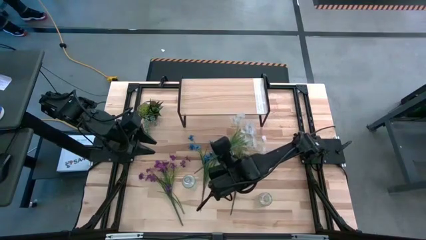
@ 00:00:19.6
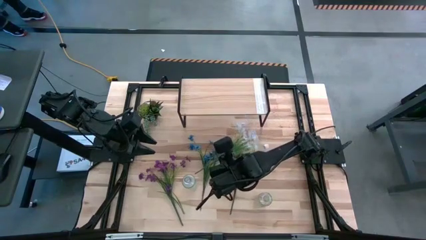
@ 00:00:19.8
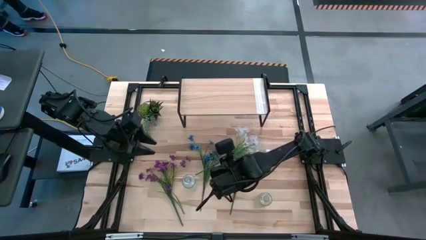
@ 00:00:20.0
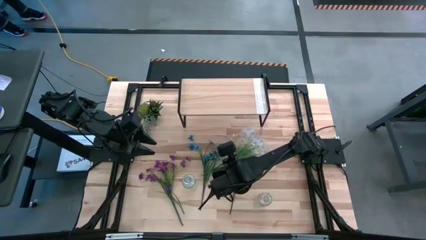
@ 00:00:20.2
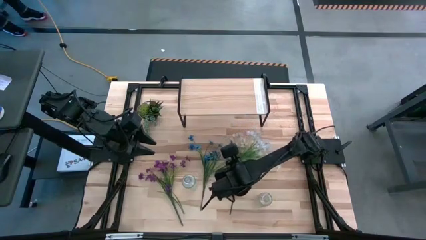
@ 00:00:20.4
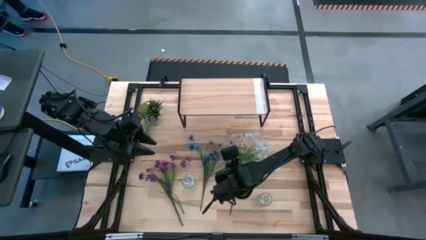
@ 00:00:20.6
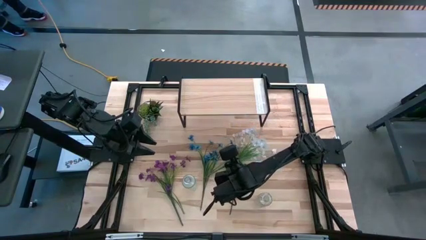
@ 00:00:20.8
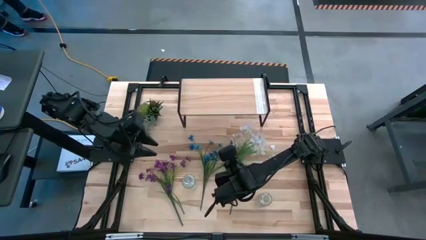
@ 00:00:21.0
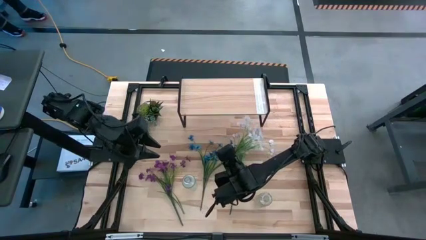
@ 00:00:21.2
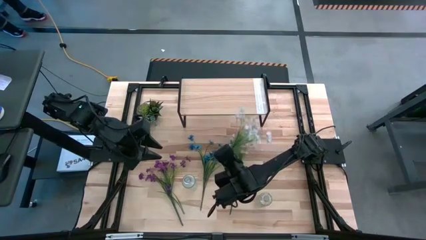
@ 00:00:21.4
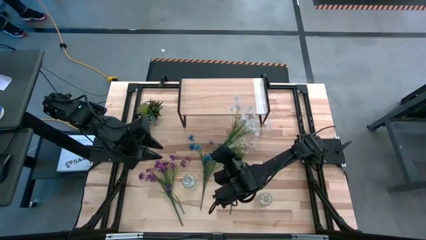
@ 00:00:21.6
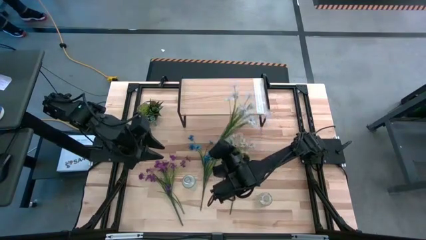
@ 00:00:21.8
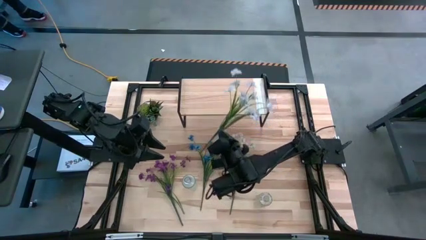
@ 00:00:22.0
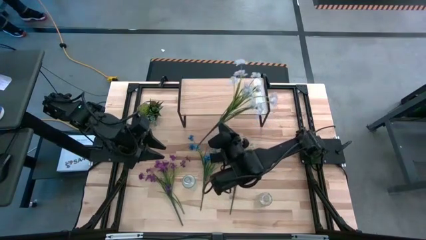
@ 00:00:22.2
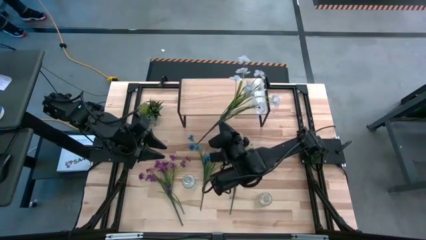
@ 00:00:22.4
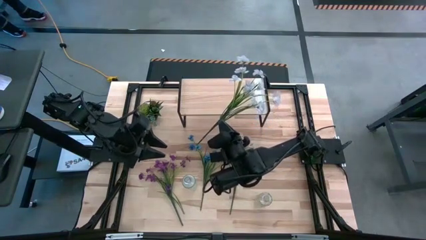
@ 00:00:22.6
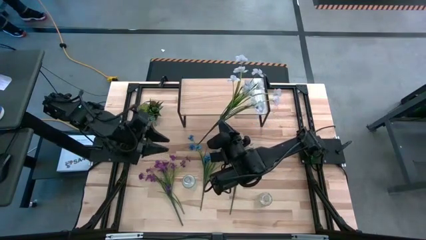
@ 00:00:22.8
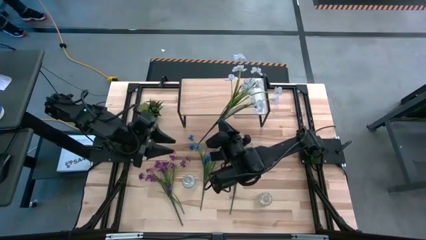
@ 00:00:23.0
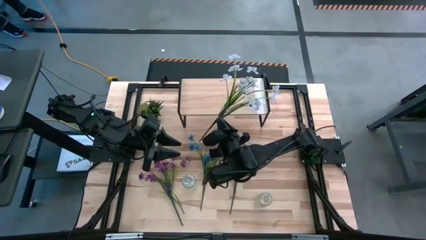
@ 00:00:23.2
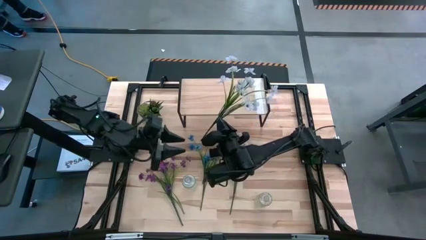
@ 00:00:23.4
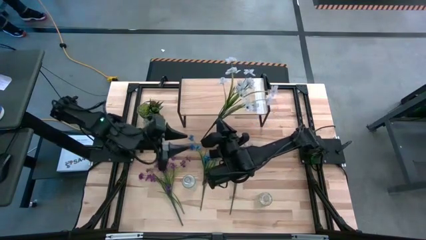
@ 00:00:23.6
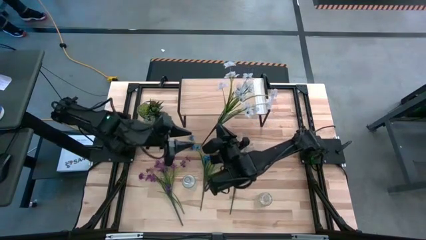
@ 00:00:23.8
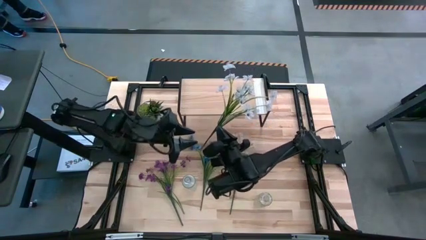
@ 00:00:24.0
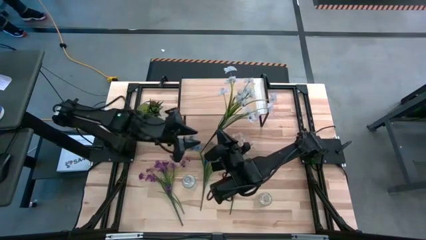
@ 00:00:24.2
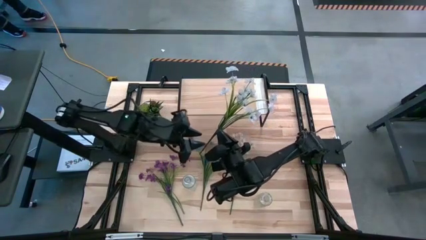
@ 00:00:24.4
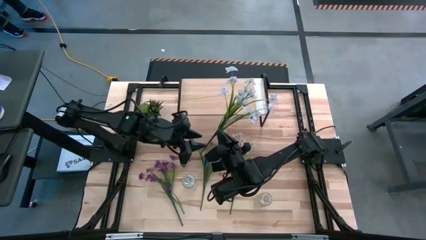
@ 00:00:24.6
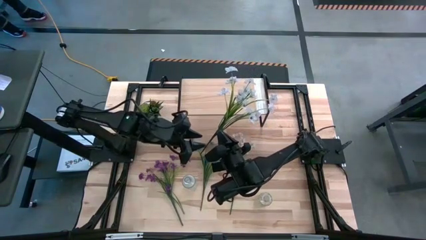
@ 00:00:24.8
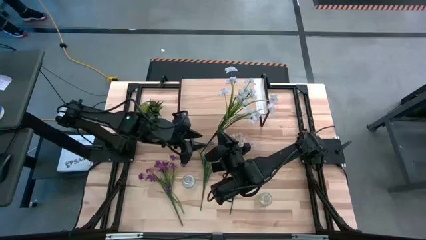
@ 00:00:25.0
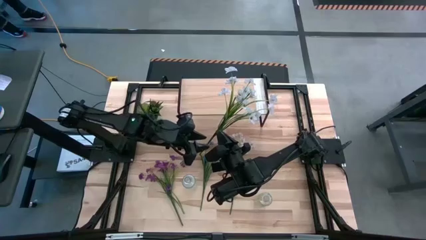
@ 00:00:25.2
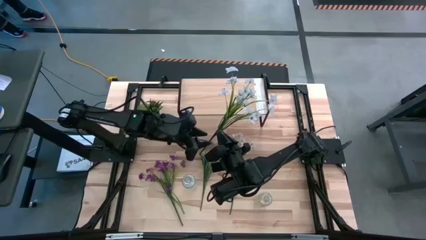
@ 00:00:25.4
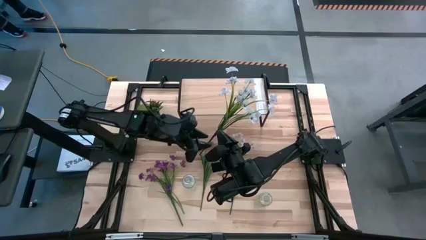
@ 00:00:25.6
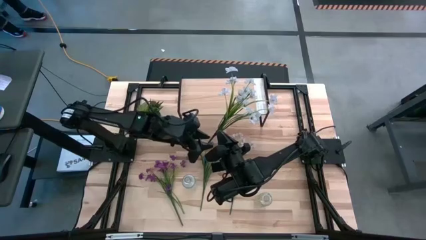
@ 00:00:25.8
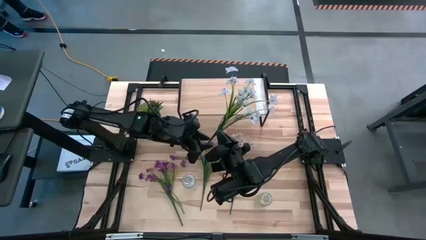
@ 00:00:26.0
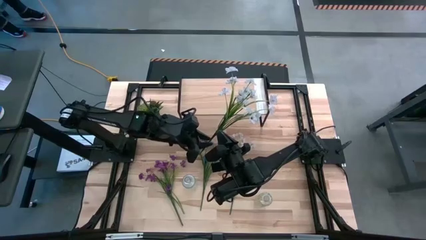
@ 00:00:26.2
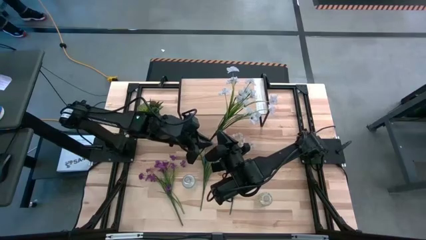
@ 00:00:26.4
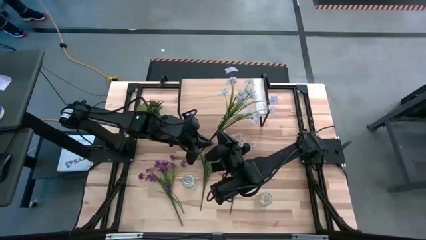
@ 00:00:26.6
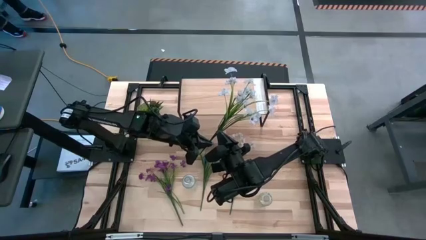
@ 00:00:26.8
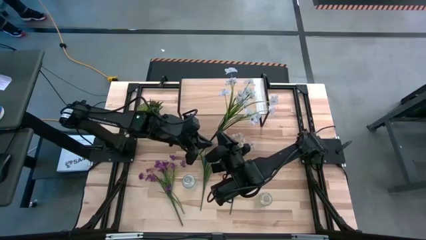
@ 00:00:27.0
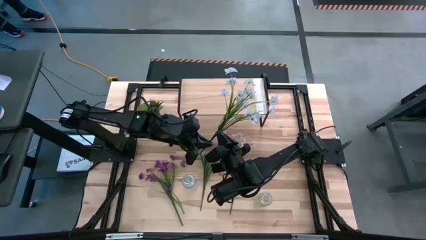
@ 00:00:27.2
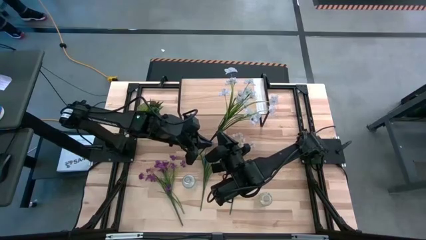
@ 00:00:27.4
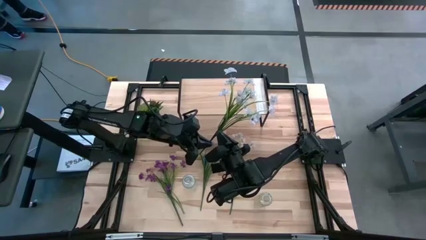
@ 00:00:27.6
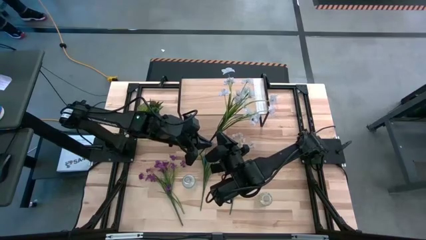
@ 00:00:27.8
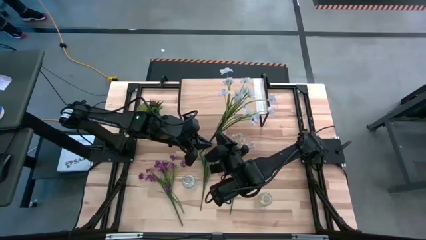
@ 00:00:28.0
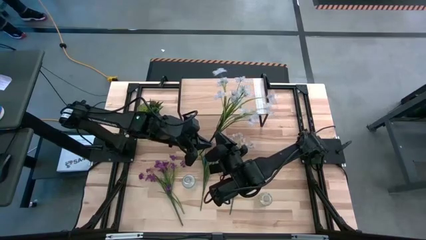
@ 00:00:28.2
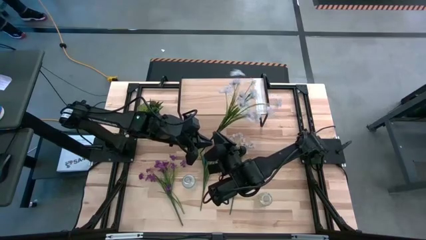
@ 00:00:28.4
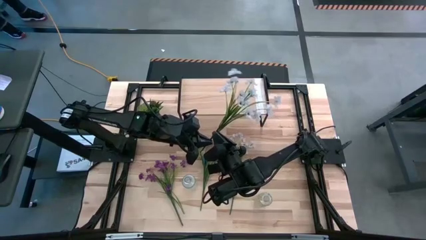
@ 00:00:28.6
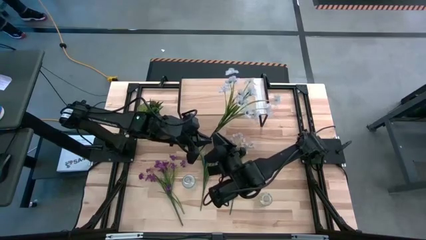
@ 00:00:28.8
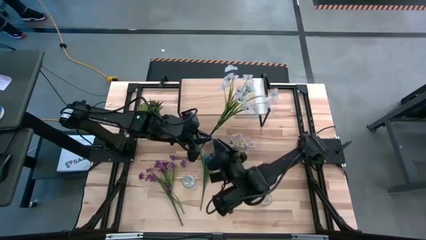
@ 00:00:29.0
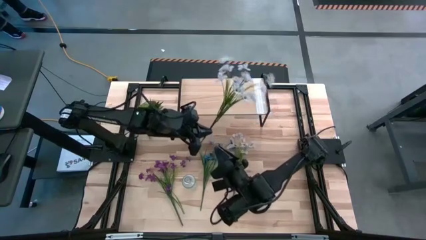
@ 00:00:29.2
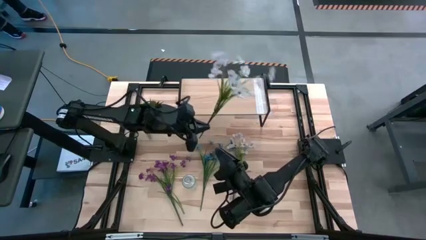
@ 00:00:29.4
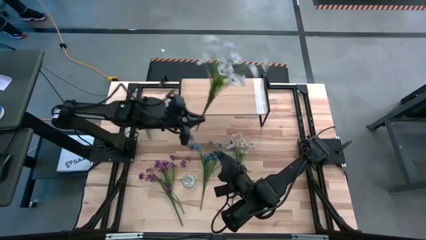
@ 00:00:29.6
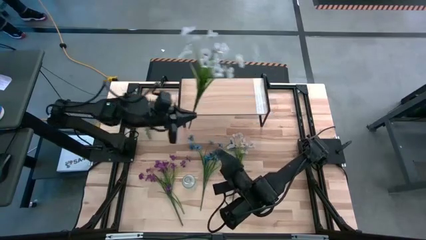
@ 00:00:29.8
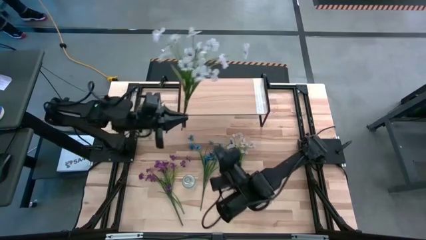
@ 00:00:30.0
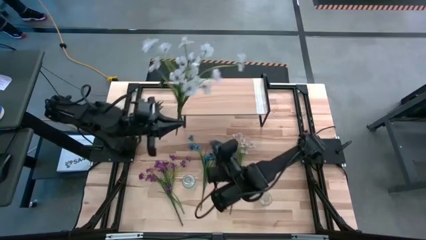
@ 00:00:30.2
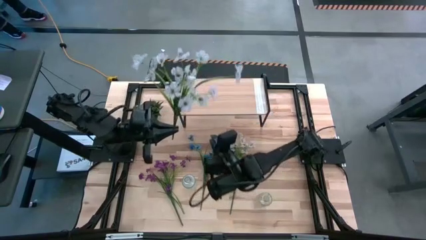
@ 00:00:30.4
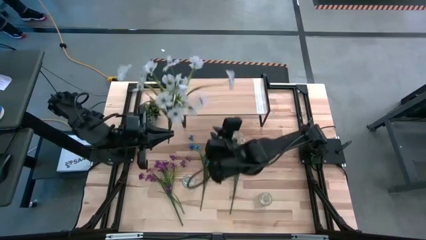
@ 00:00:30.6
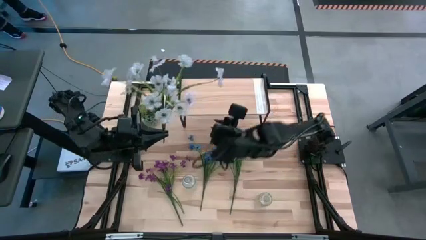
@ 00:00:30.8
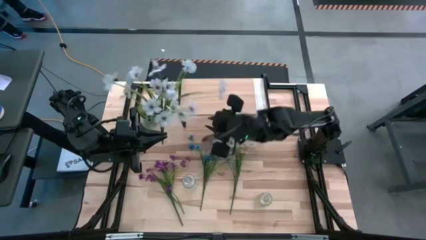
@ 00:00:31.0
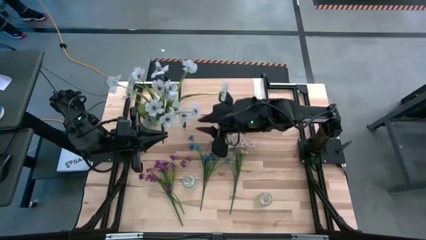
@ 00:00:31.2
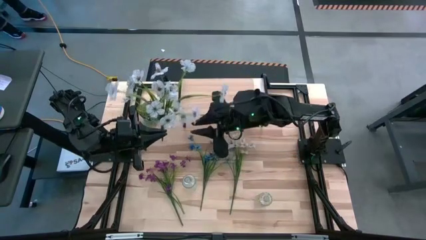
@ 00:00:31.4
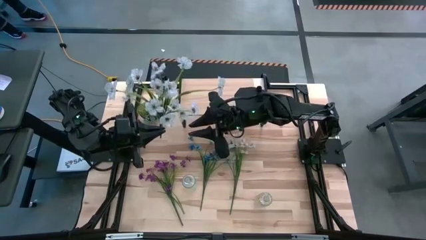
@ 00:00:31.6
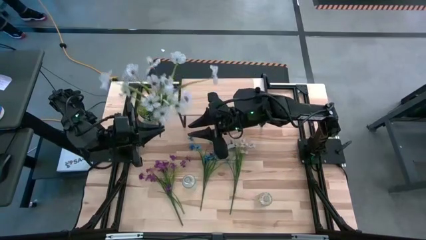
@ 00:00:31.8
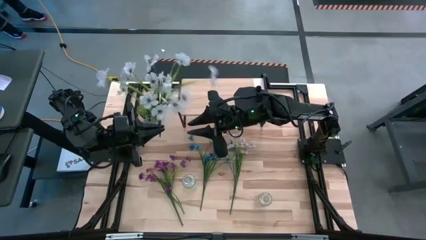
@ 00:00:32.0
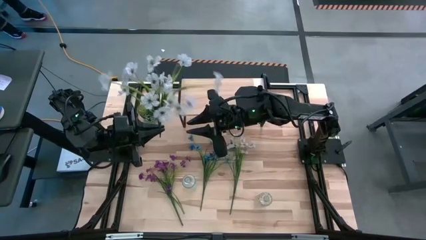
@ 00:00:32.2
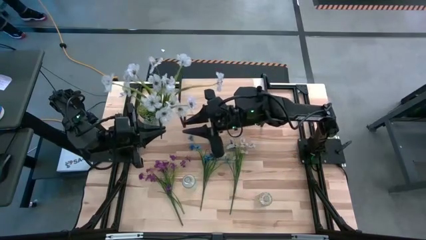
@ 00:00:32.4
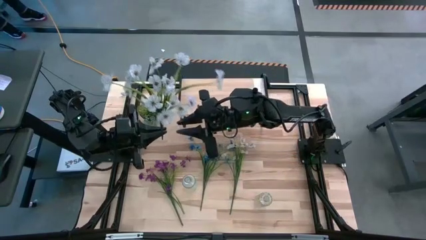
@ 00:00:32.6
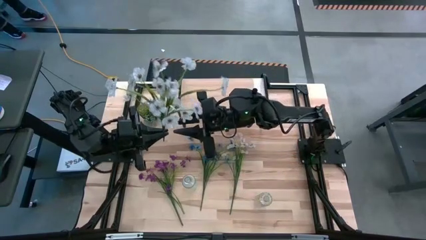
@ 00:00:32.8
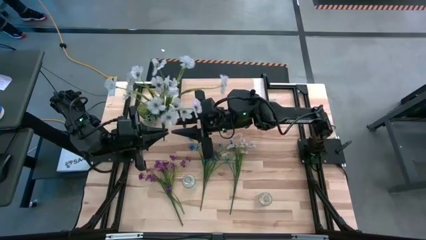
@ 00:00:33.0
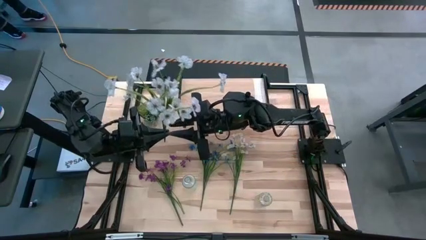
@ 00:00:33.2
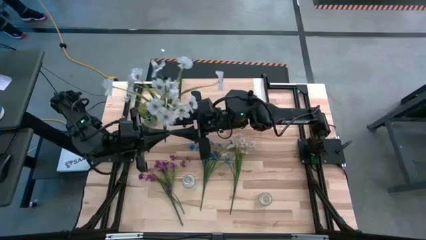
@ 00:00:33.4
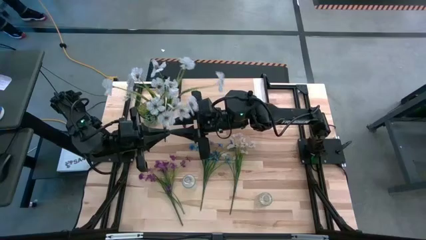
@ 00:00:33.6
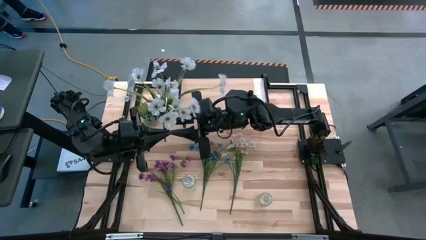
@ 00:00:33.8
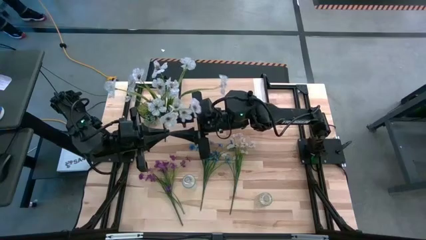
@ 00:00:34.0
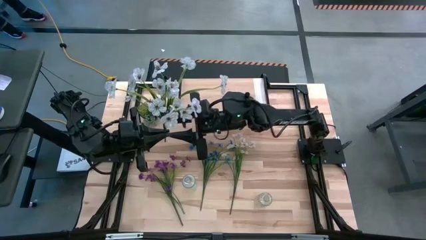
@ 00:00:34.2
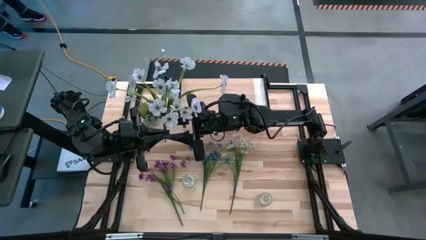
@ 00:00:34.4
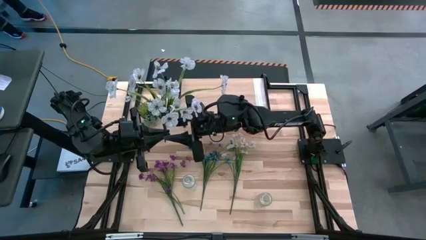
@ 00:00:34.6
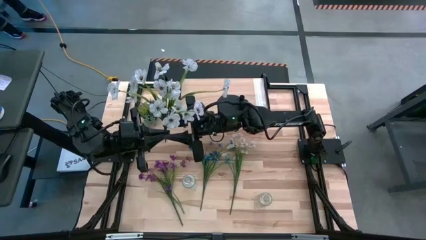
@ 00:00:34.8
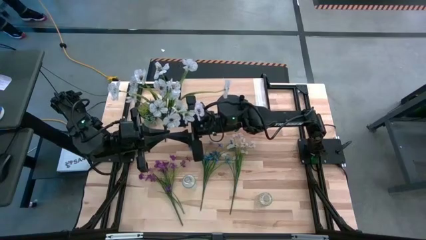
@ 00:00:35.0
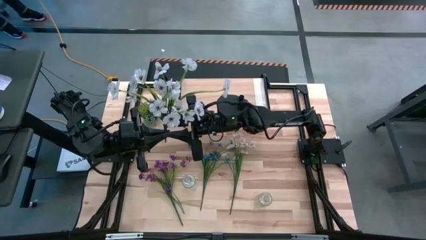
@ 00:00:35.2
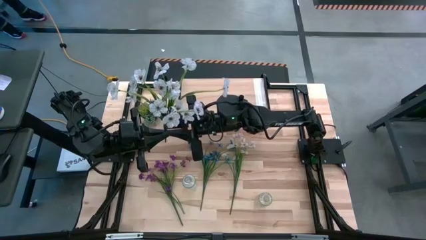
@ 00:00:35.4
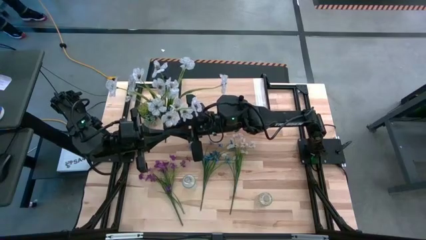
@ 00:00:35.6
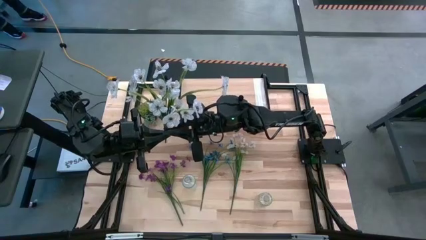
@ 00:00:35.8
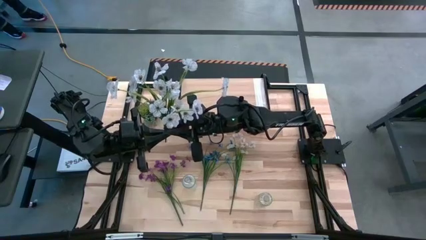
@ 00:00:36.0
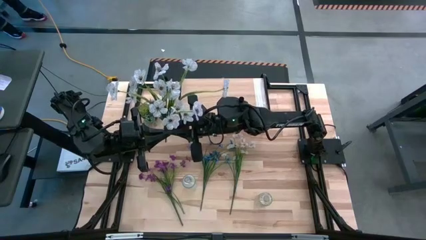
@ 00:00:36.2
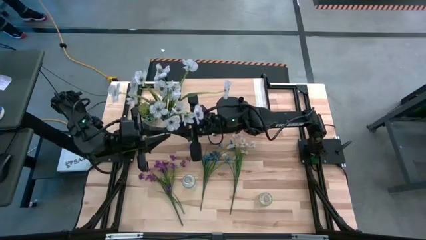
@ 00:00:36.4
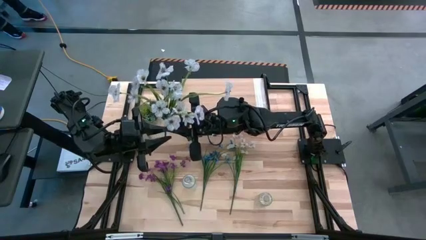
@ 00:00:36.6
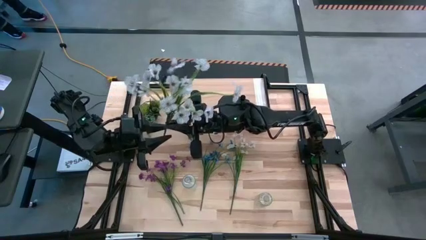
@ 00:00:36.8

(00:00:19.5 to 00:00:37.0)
Task: Pick and place flowers into a vace then onto a shelf
Put the left white flowers into the right transparent vase
